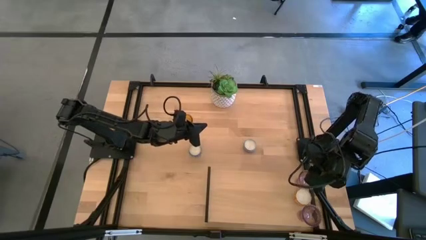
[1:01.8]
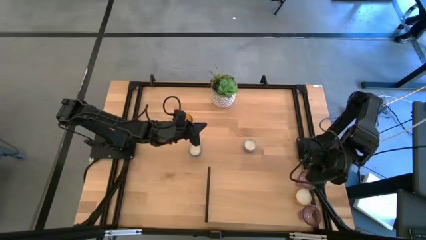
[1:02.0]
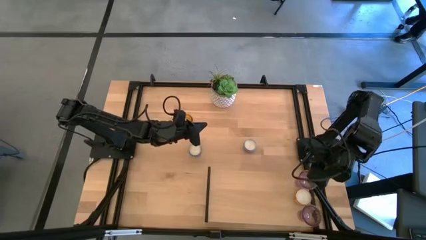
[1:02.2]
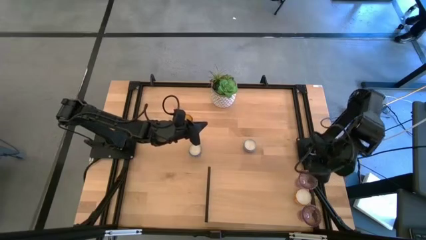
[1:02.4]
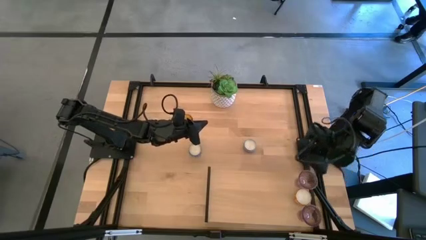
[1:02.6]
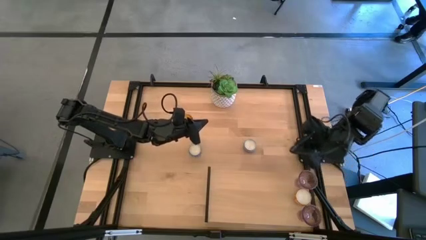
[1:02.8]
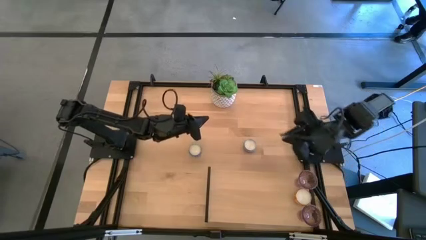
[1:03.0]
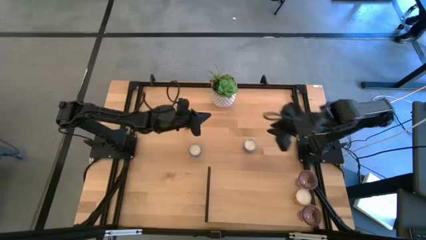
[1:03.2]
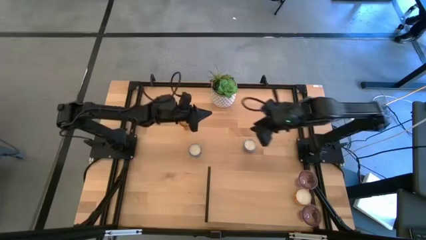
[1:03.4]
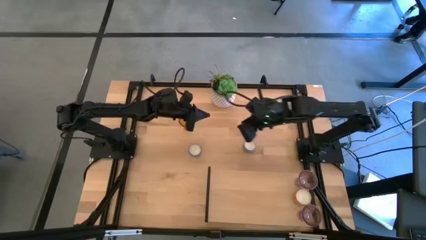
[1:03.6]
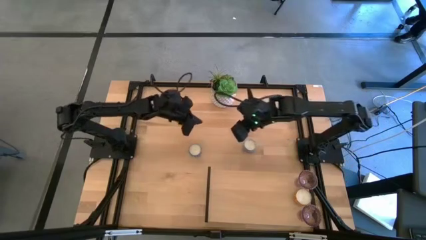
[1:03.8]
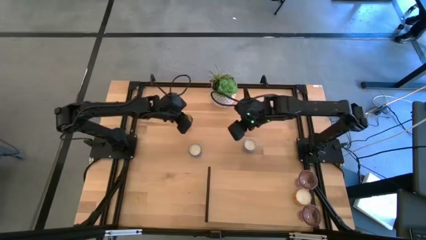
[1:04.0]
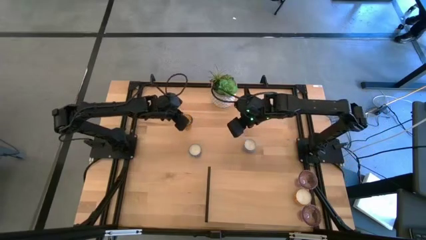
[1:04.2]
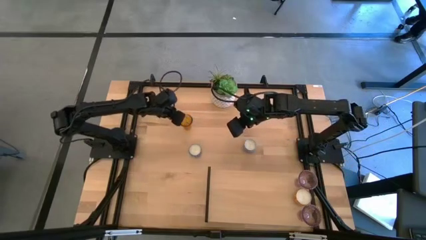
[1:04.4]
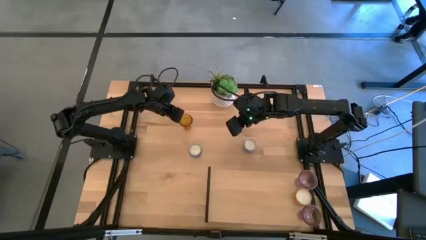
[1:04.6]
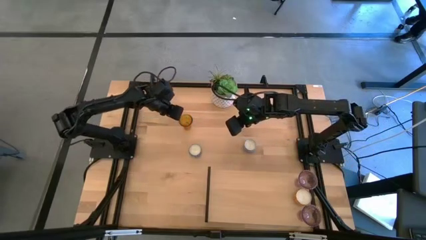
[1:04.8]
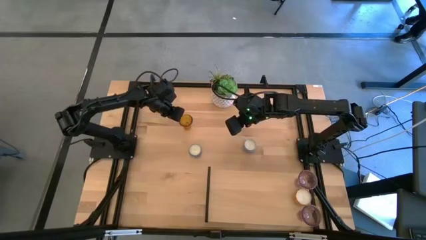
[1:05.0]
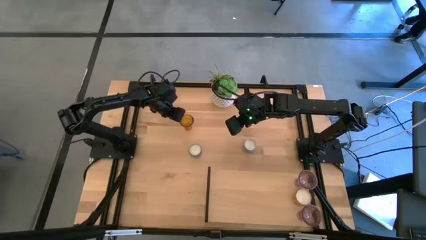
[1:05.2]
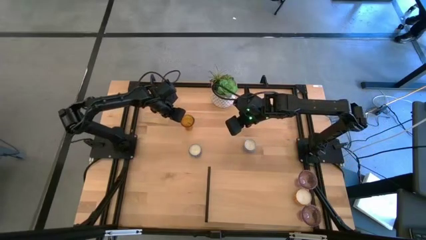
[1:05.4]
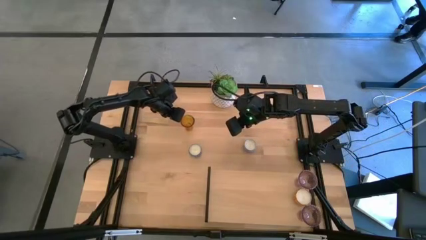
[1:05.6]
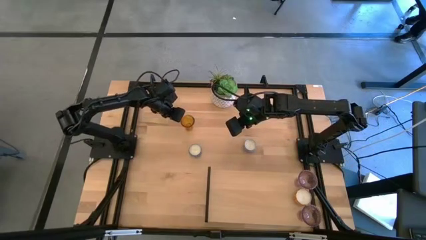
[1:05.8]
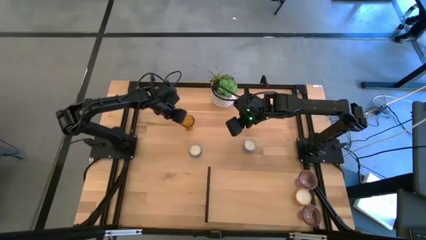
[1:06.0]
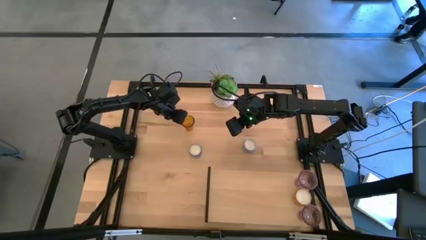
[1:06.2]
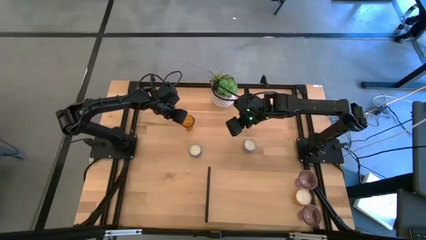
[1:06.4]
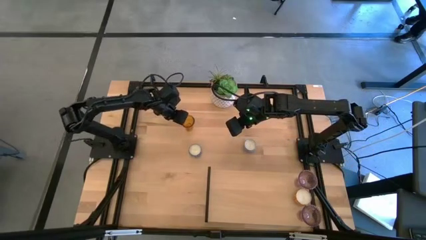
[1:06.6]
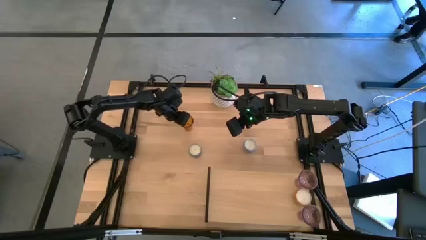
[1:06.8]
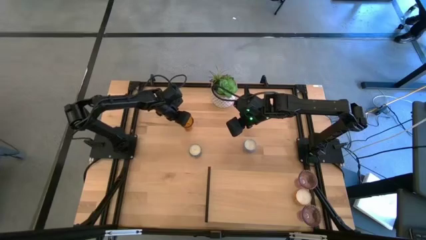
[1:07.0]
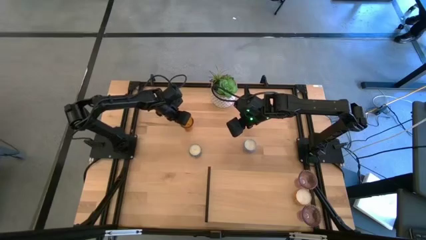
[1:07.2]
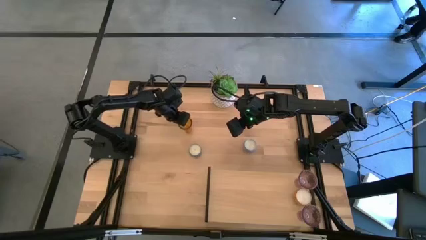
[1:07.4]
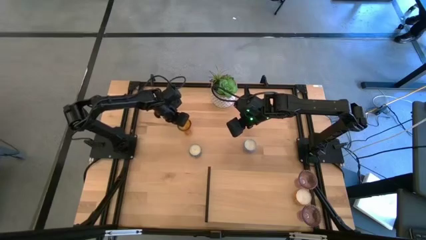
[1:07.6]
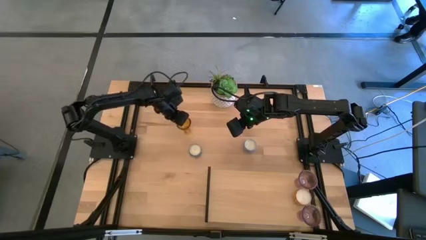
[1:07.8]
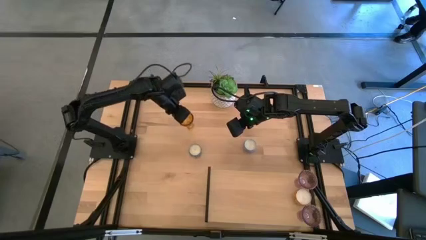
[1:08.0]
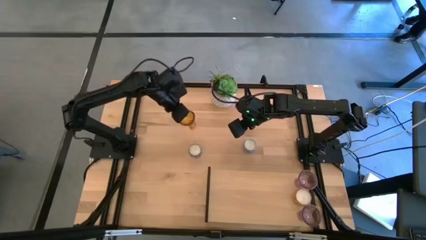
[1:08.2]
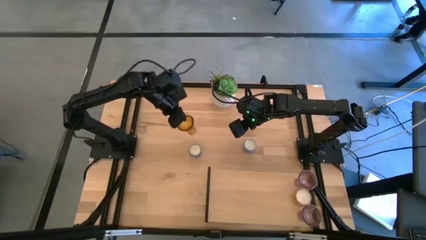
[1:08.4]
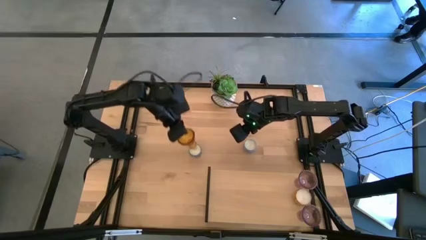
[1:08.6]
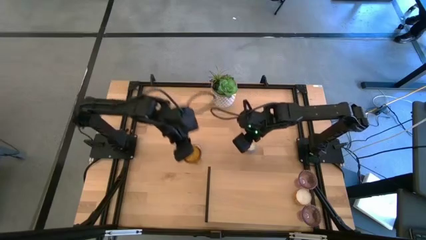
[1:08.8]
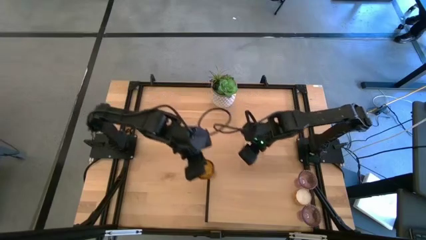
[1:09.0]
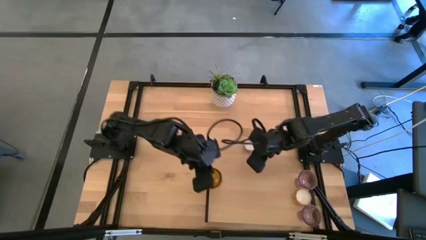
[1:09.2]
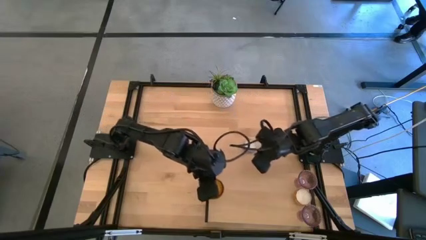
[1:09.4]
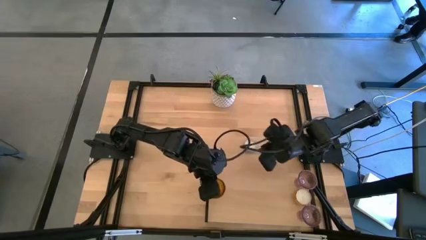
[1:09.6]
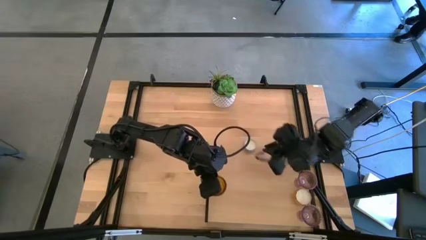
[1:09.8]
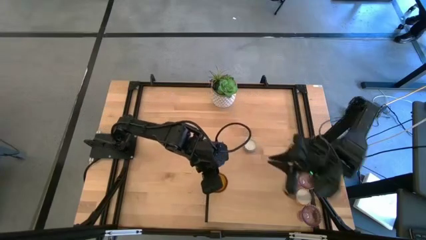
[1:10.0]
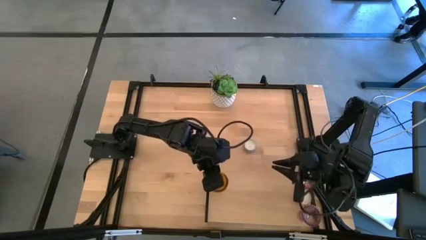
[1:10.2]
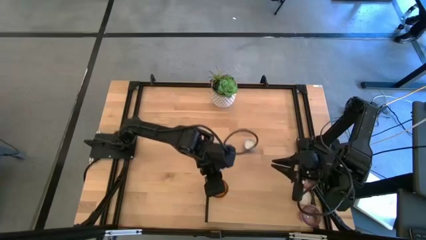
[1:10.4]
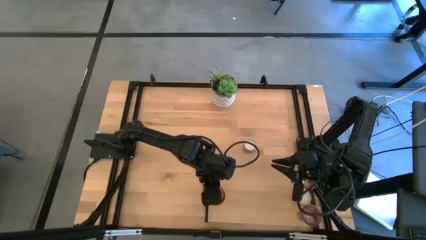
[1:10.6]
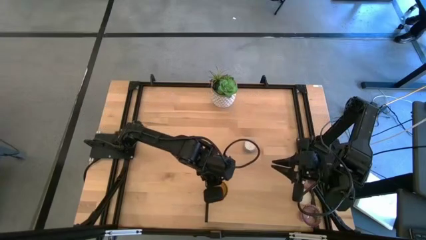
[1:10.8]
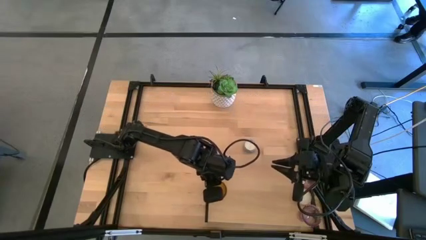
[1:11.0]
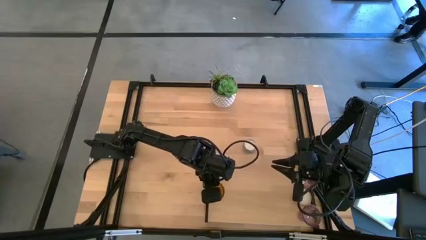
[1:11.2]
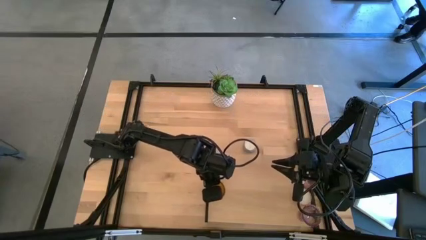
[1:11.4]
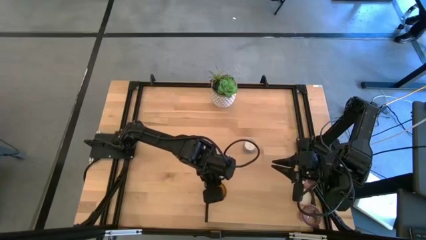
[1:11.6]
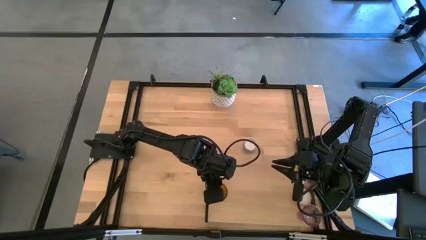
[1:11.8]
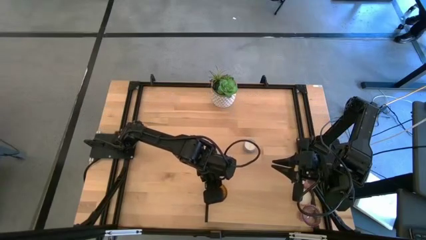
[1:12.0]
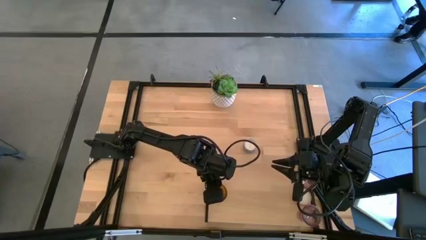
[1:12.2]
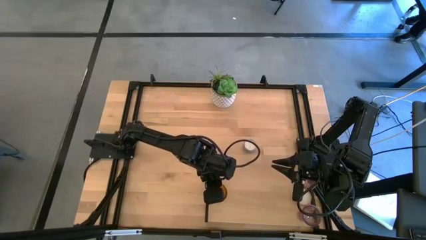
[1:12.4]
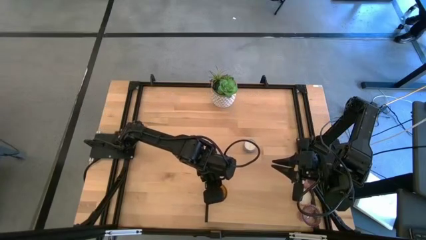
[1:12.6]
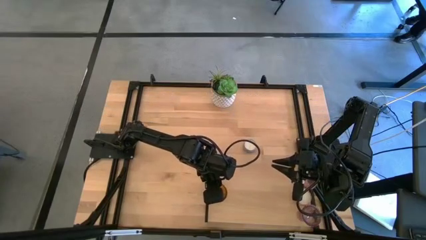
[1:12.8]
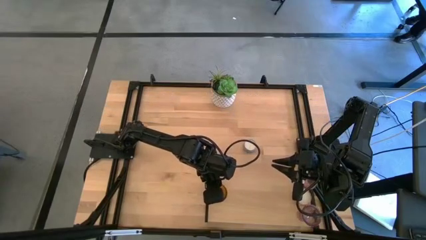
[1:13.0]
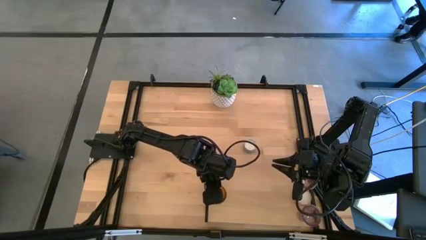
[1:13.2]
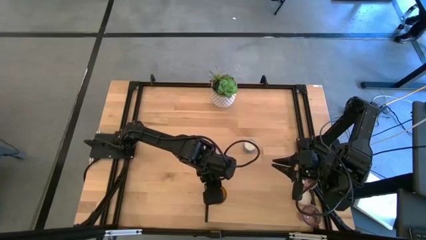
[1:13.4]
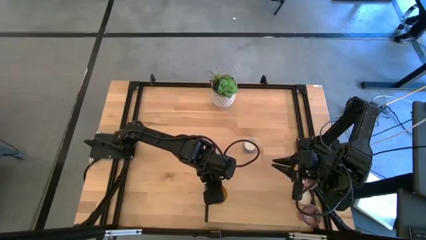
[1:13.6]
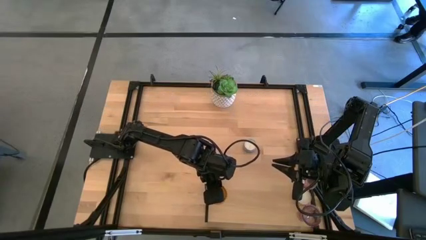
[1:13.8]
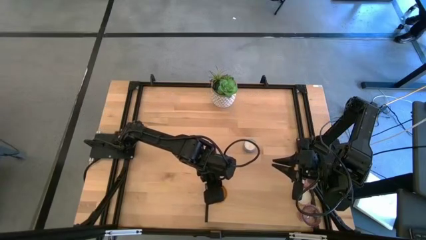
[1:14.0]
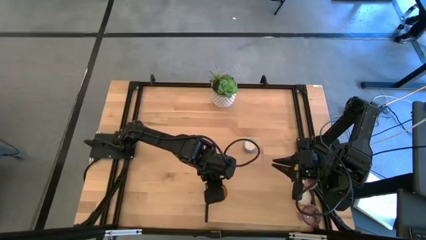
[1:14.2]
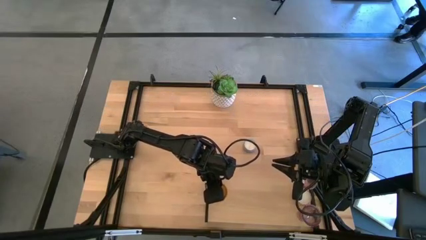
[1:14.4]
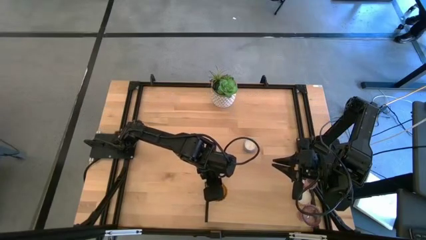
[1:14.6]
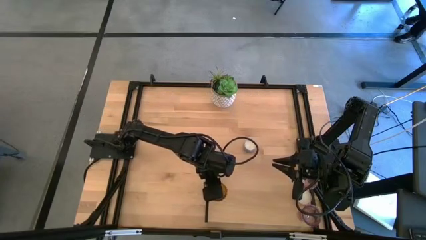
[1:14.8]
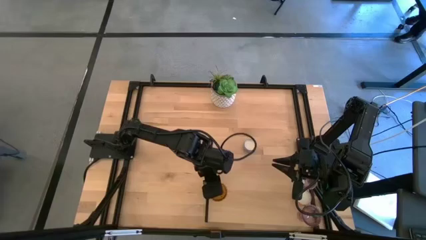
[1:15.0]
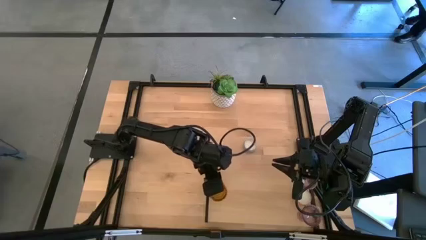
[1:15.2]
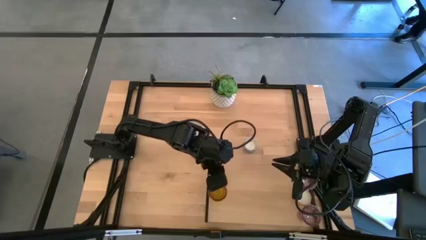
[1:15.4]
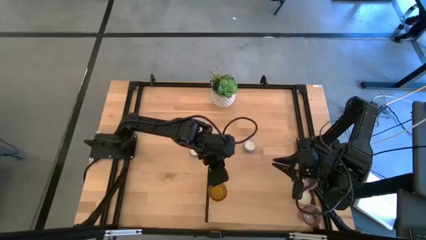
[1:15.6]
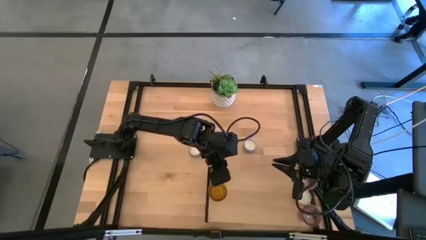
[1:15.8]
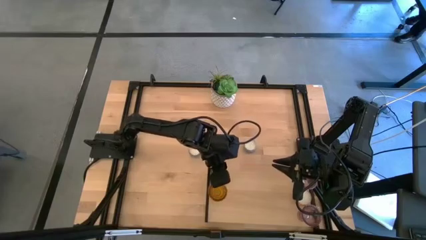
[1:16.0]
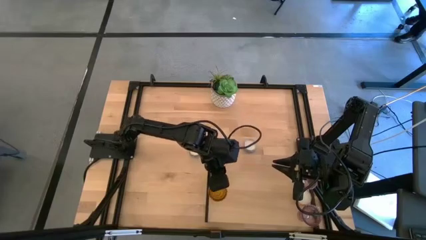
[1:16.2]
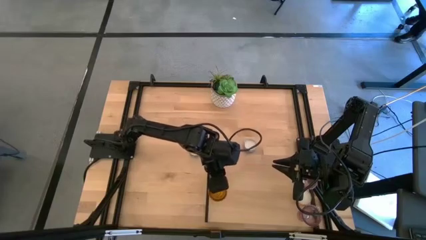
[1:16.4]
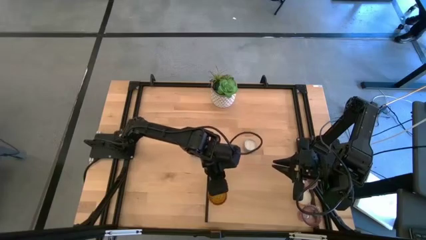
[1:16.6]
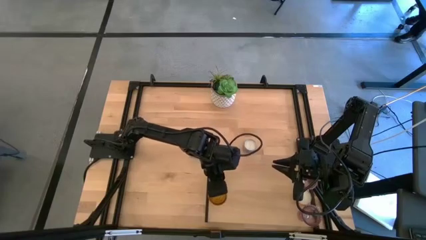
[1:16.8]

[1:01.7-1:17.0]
Task: Pick & Place candle stick holders
Put the yellow glass candle holder on the shelf

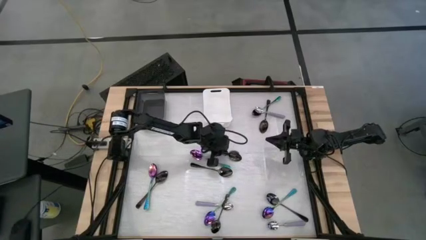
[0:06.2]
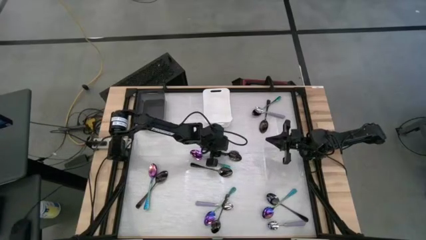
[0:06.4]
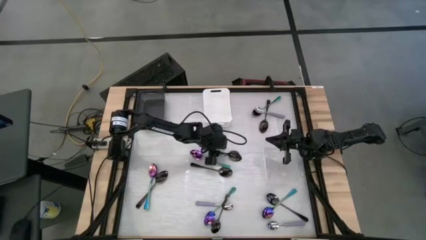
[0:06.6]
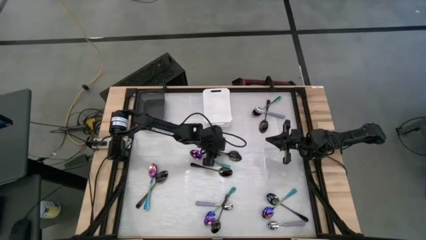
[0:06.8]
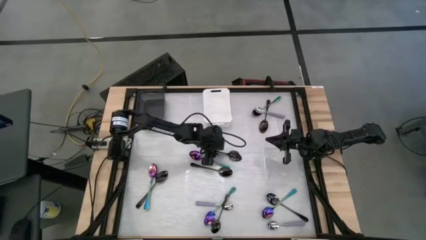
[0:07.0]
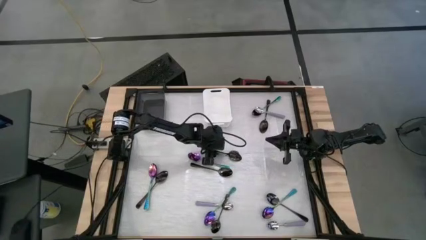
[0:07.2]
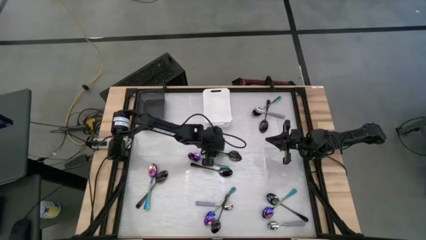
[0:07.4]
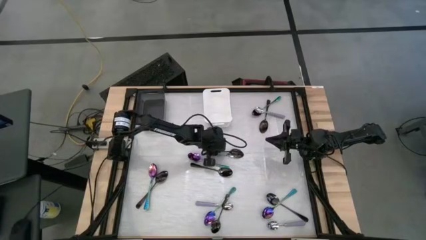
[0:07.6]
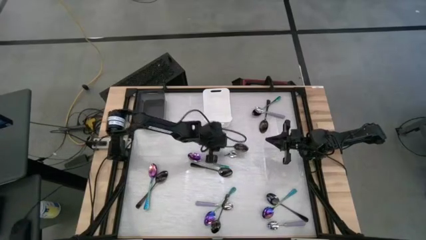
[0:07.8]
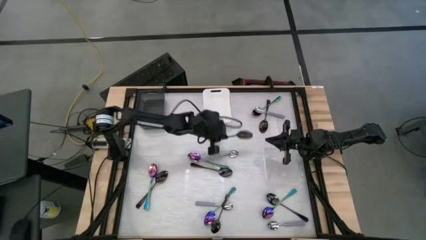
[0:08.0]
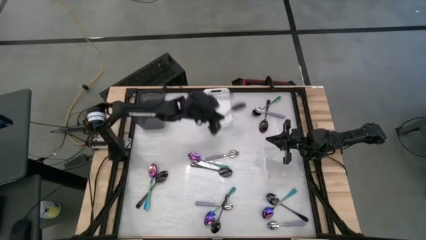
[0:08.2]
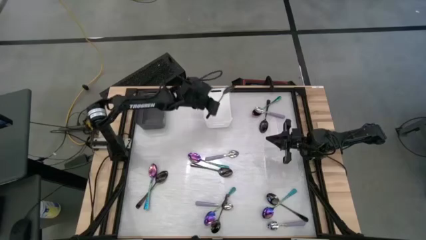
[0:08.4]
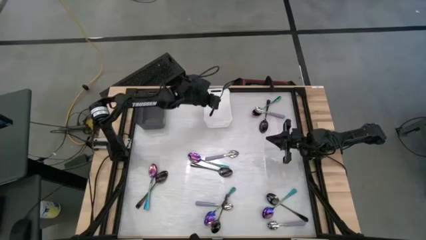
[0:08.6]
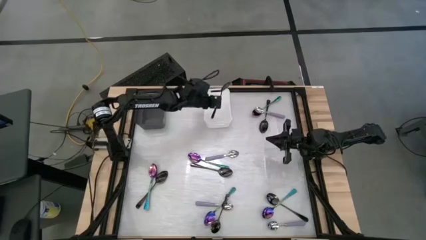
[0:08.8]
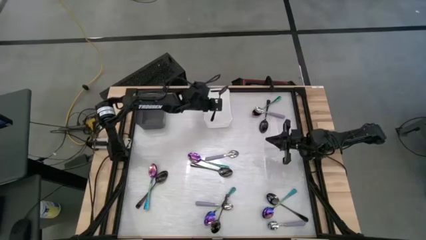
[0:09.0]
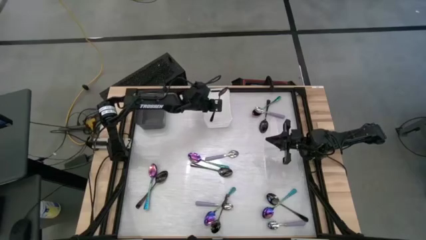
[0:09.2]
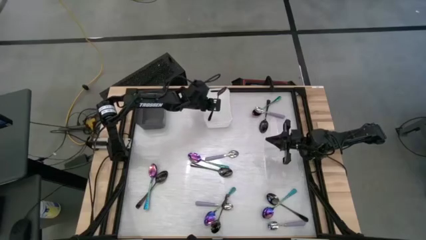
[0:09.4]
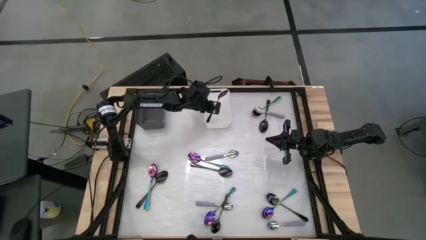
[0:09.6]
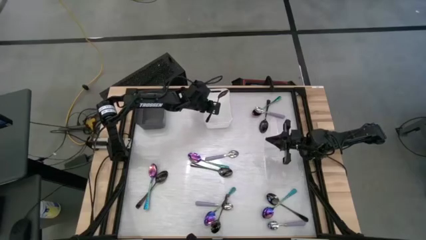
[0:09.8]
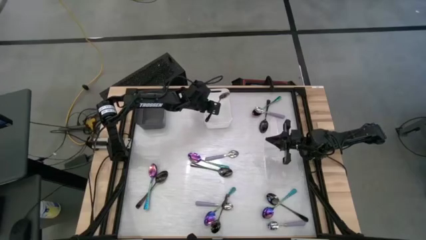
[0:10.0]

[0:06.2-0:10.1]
Task: Sort silverware by color (type)
Put the black spoon into the white bin
